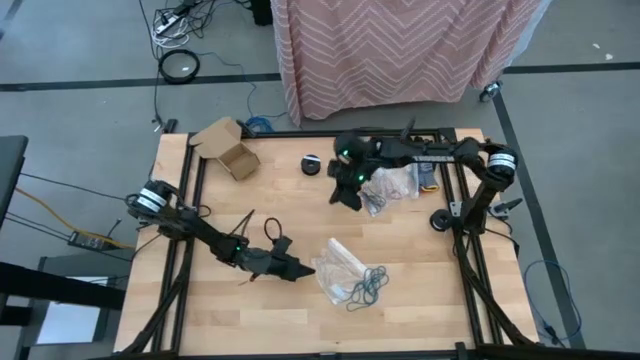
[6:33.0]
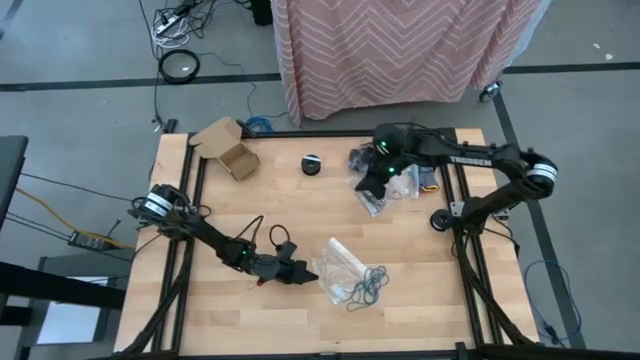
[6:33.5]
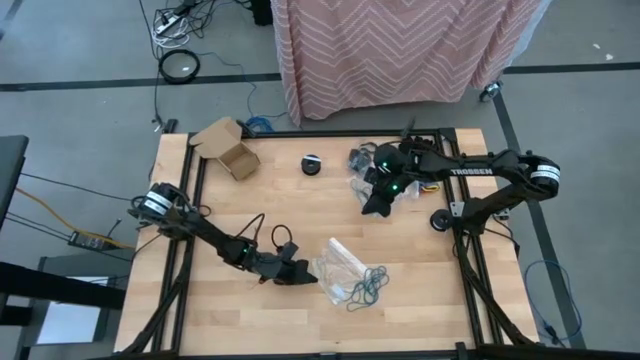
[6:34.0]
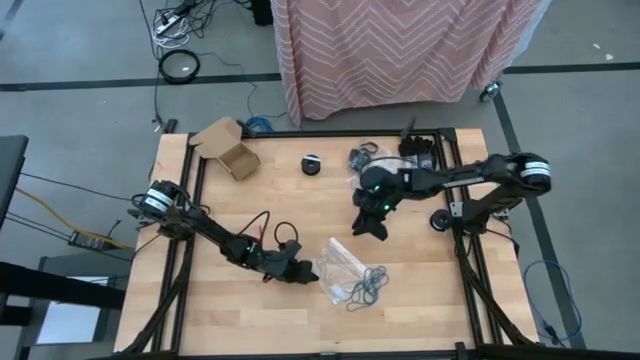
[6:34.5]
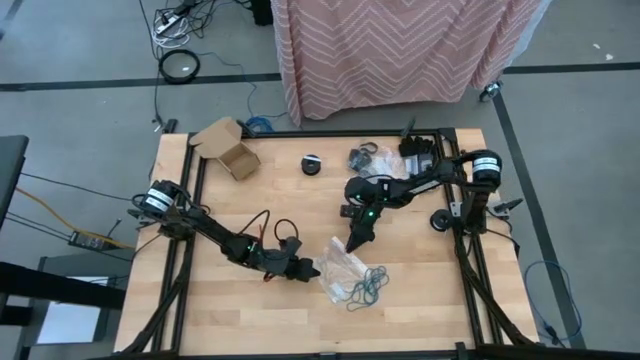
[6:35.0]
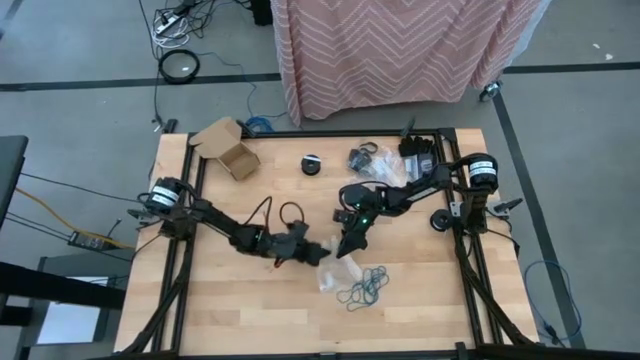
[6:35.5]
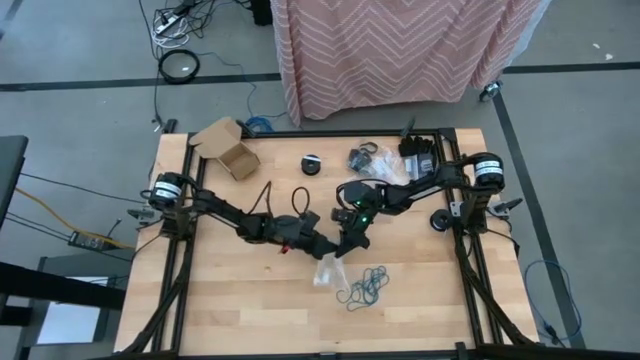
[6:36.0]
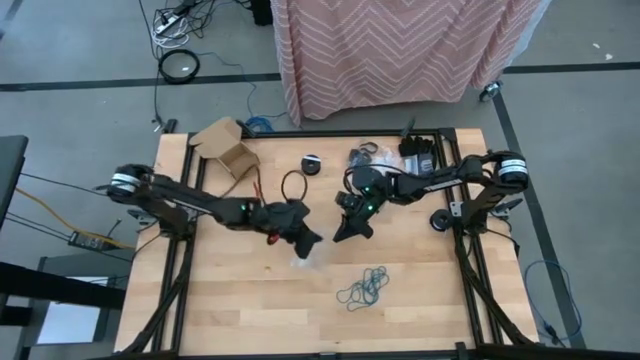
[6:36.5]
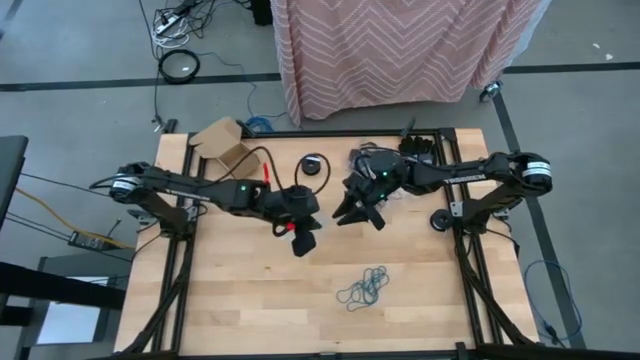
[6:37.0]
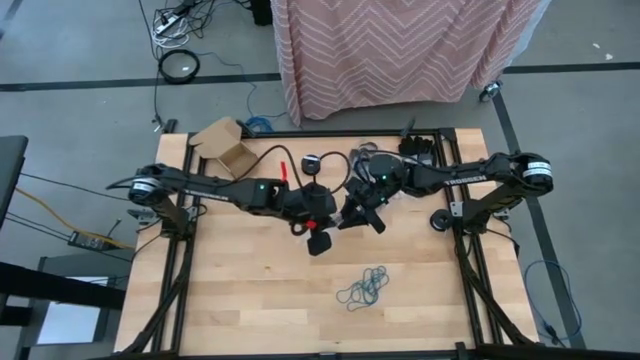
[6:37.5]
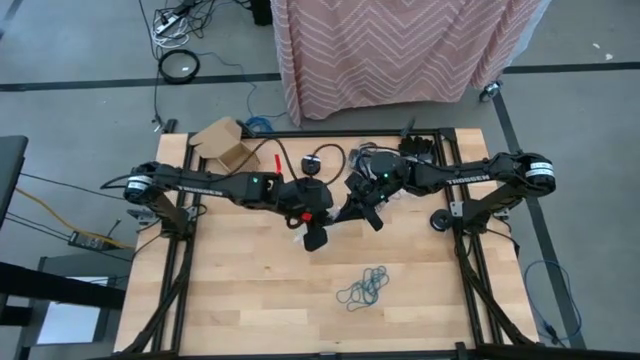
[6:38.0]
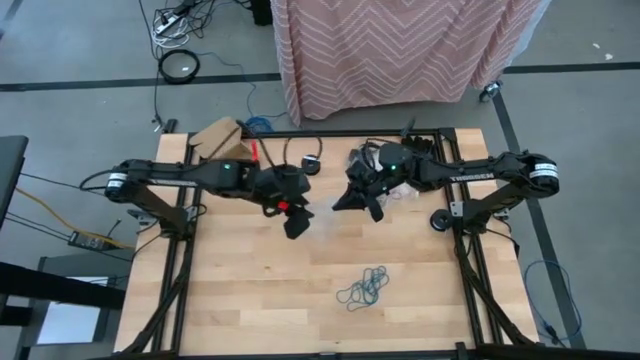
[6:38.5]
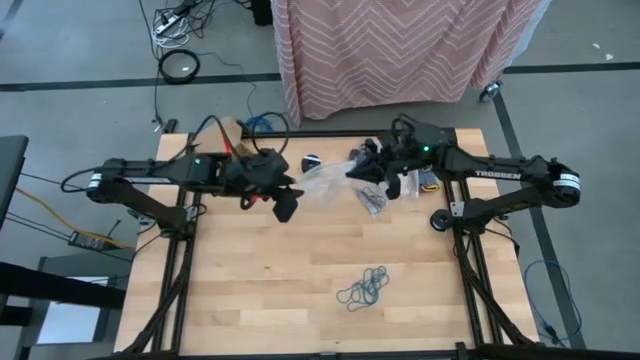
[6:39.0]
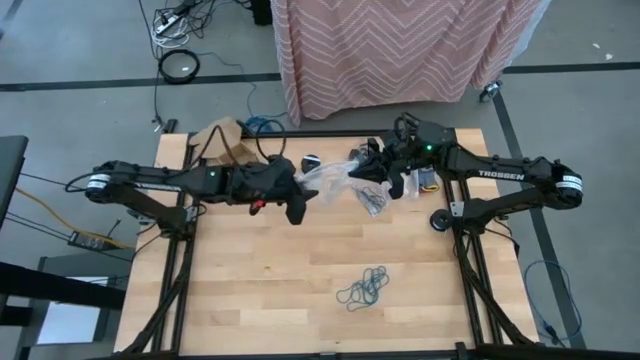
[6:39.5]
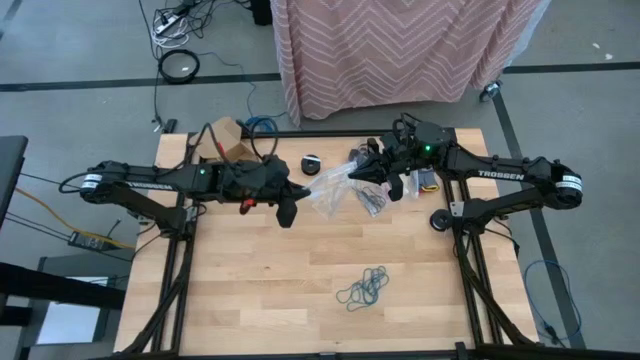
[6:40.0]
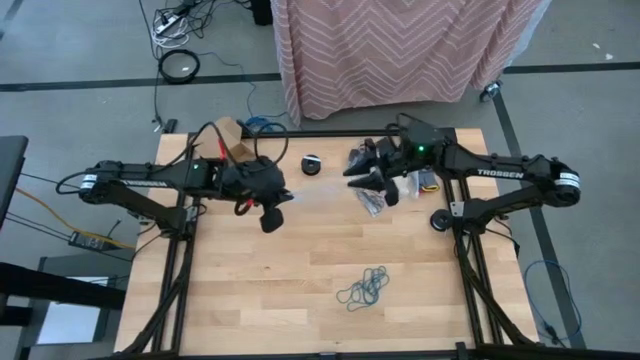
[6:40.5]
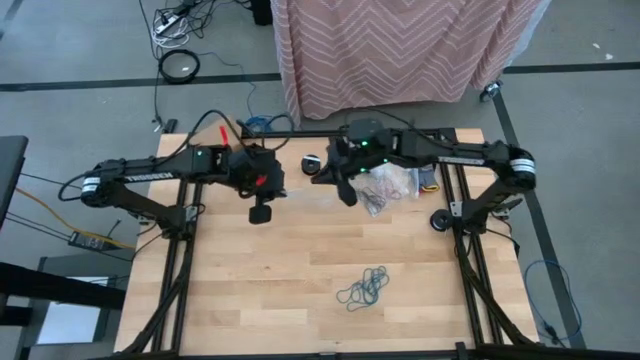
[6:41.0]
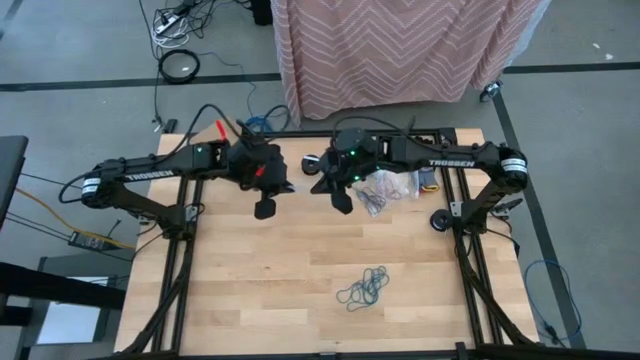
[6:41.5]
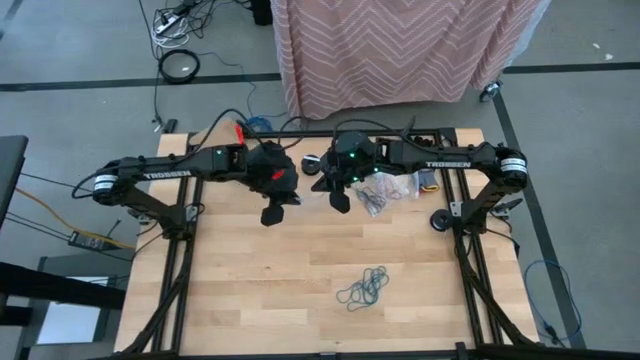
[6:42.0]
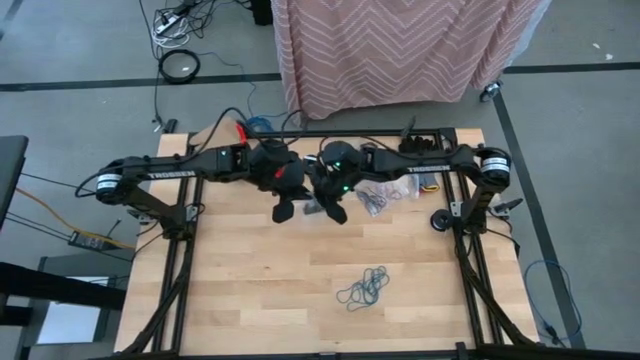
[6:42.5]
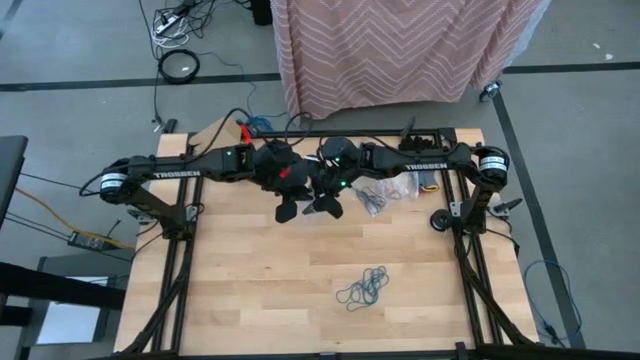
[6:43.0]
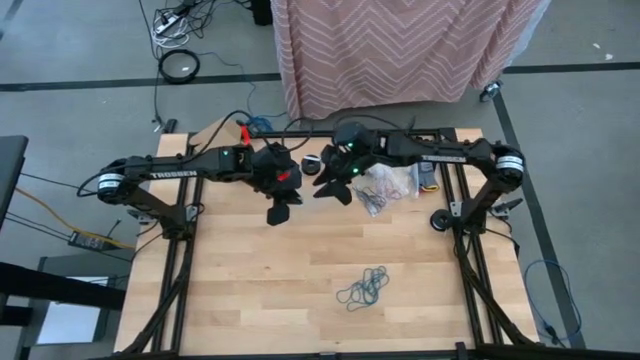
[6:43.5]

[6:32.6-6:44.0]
Task: Sort rubber bands
Open the transparent zip bag

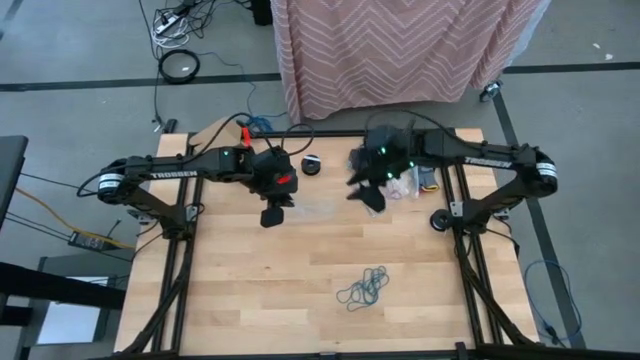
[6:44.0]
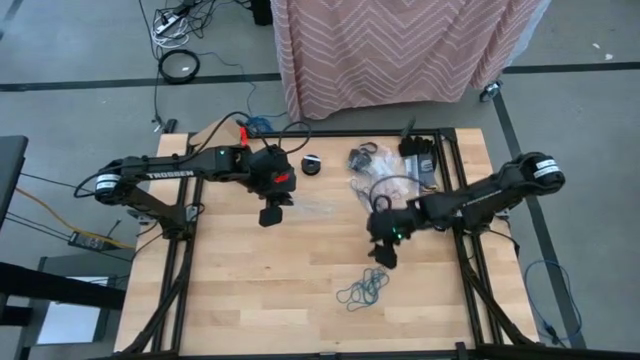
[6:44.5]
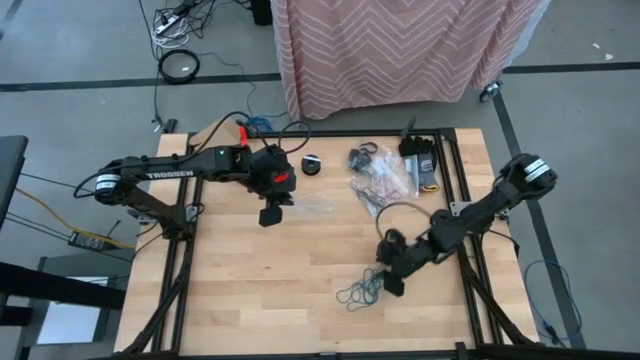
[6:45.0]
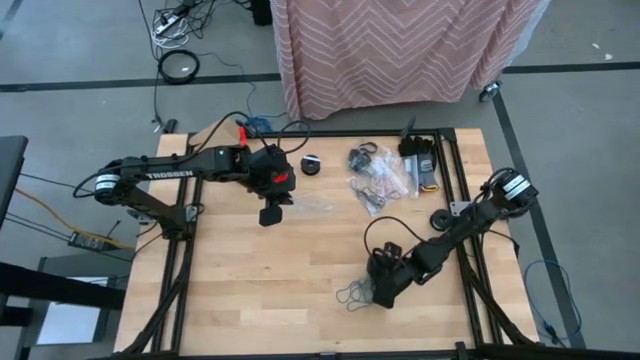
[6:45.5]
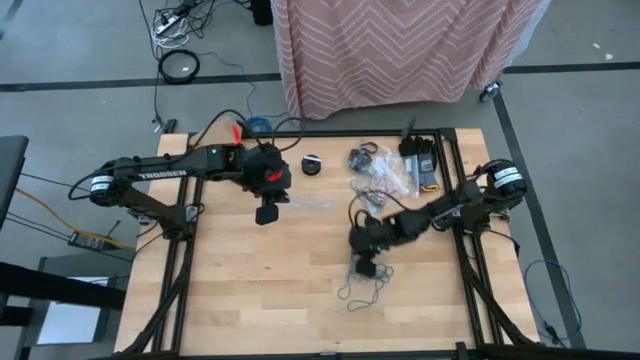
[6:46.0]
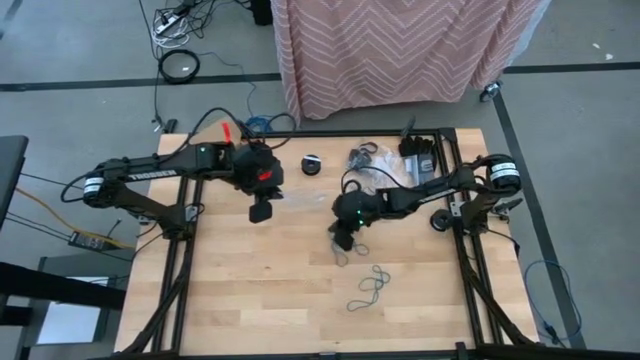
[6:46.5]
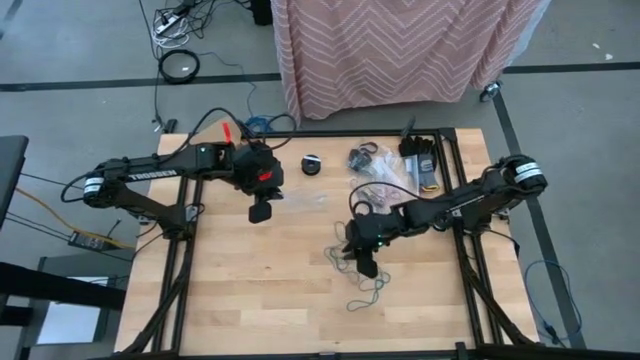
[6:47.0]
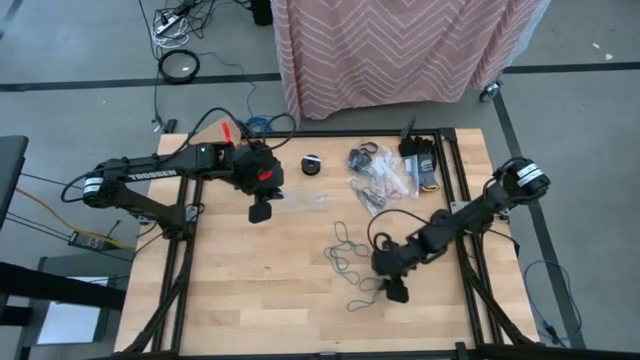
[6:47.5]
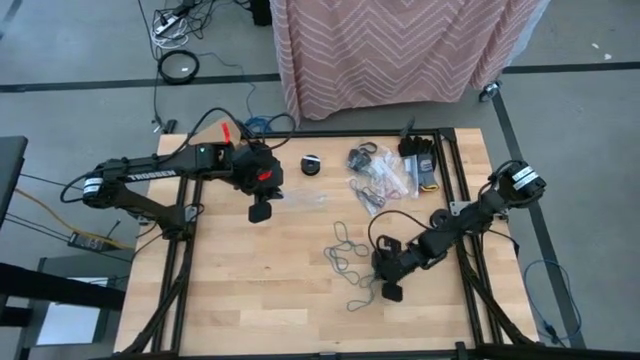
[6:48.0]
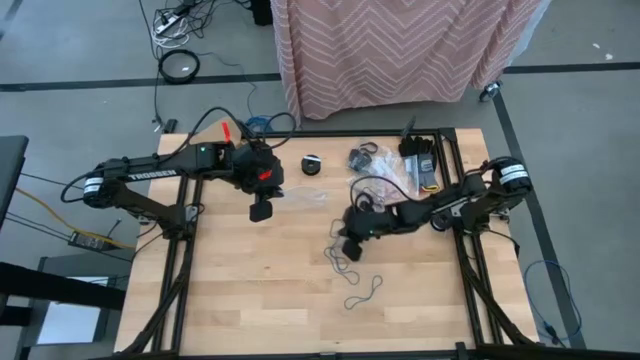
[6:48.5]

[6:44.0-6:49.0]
Adjust the blue rubber bands

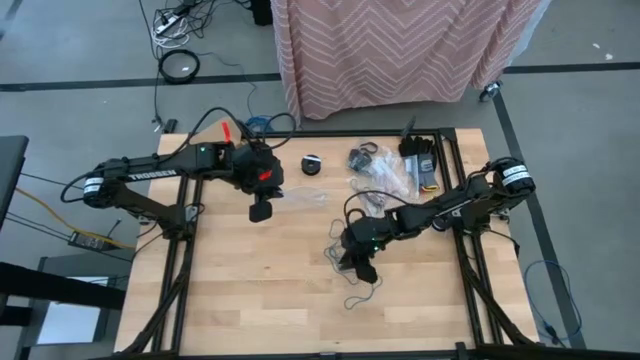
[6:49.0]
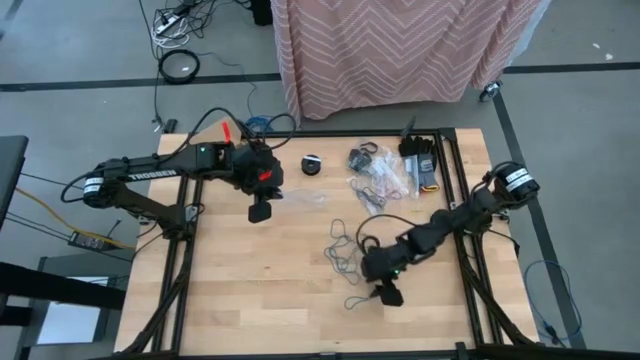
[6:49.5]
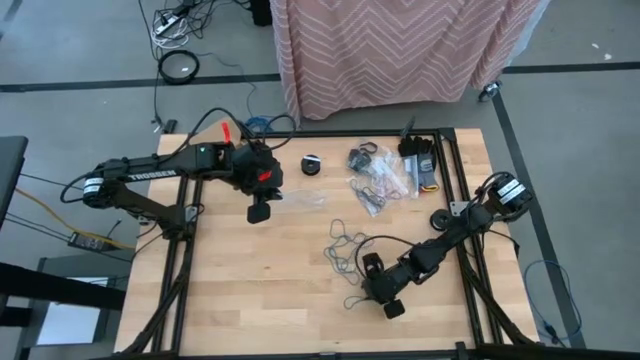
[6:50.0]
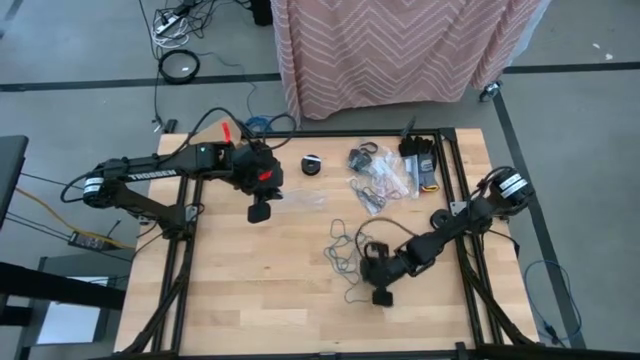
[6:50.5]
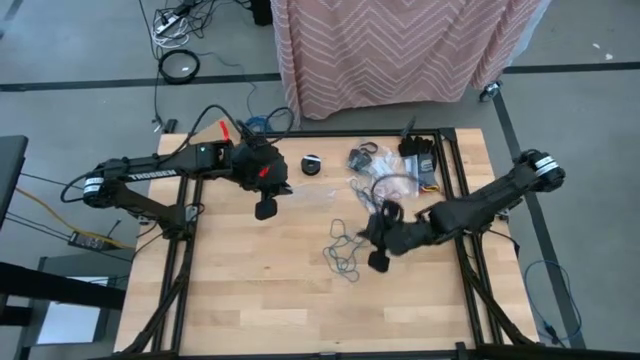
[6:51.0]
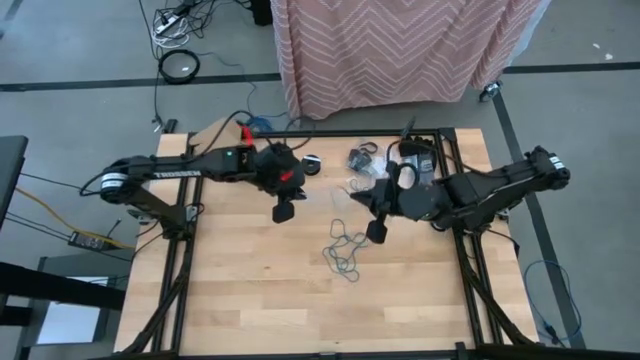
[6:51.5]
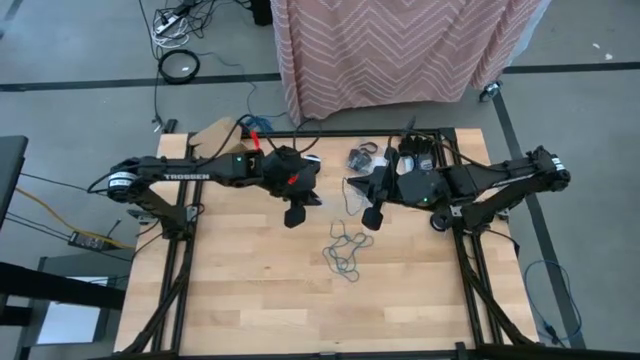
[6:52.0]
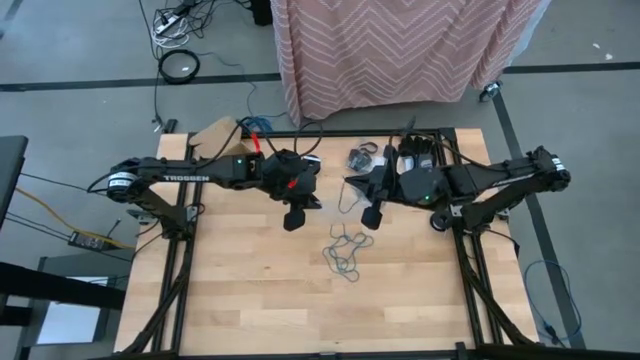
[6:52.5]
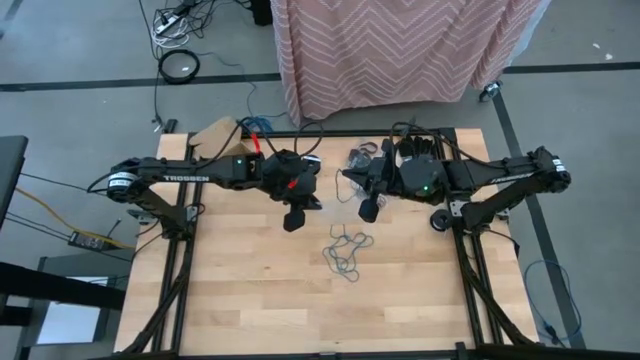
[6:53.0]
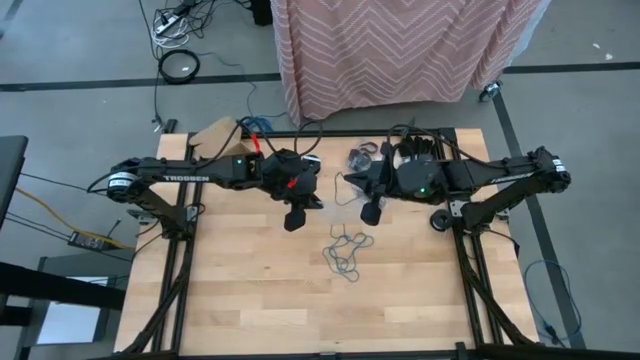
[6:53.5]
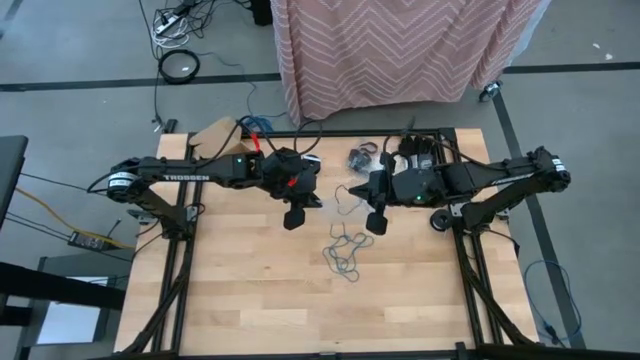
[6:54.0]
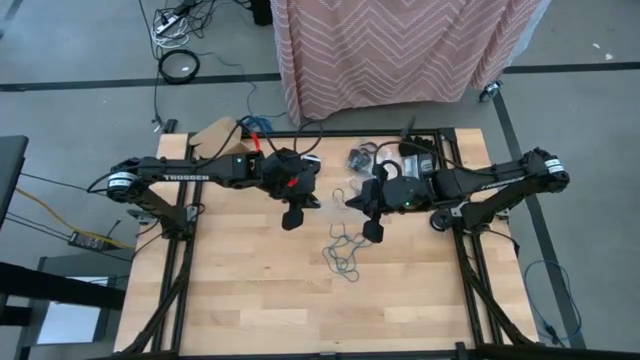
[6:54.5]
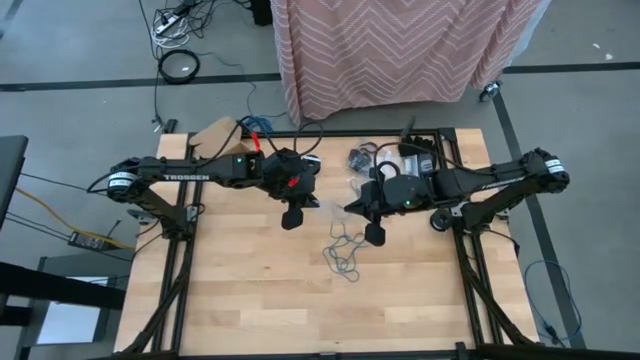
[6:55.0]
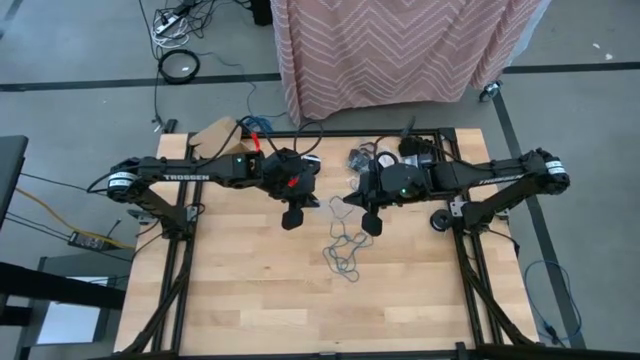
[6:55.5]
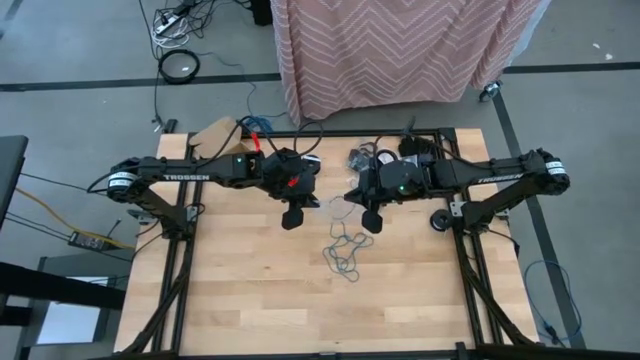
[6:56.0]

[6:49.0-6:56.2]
Put the blue rubber band into the transparent zip bag
